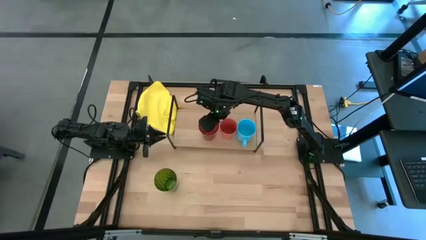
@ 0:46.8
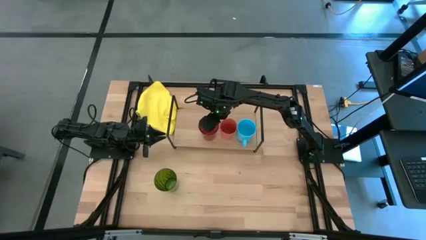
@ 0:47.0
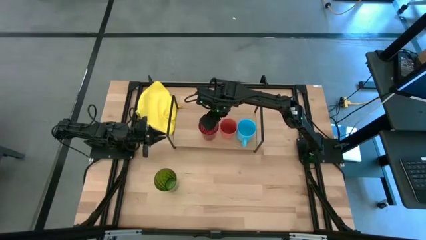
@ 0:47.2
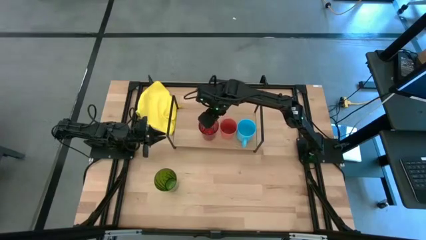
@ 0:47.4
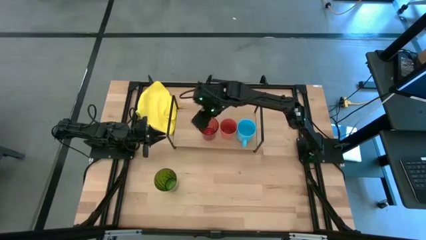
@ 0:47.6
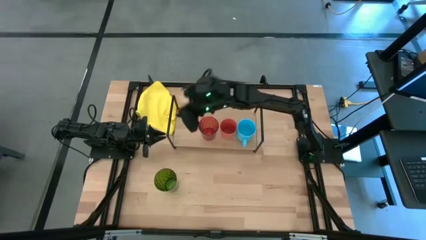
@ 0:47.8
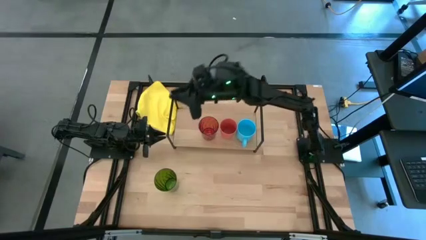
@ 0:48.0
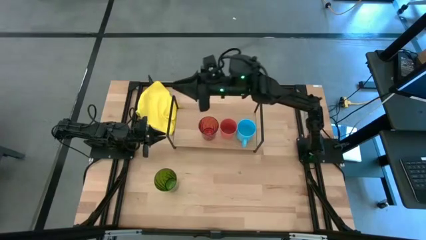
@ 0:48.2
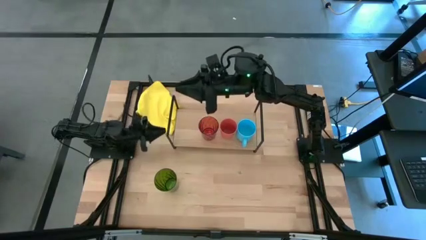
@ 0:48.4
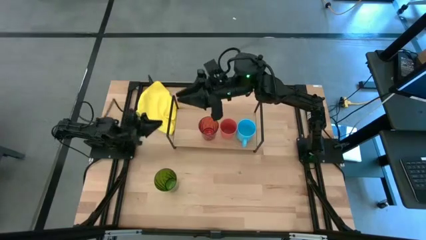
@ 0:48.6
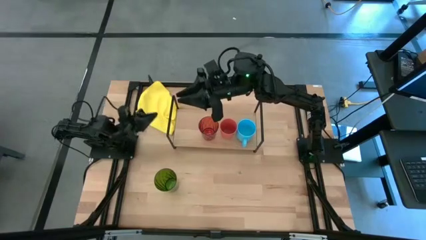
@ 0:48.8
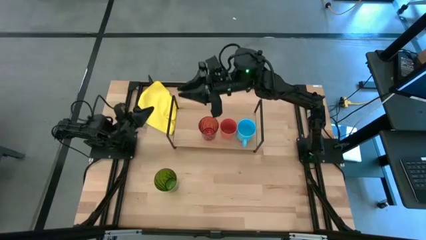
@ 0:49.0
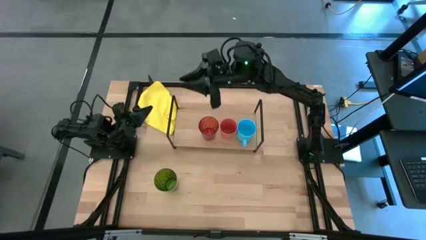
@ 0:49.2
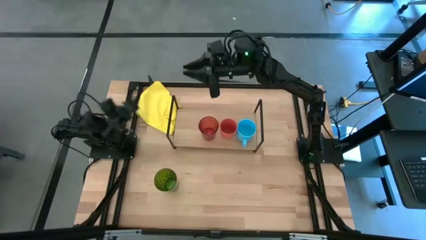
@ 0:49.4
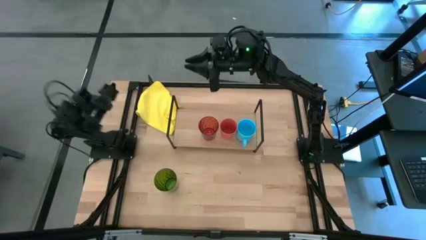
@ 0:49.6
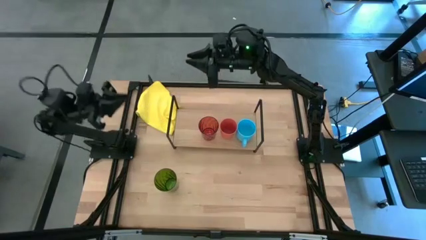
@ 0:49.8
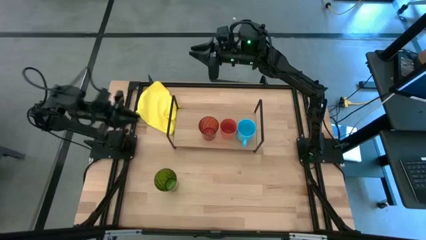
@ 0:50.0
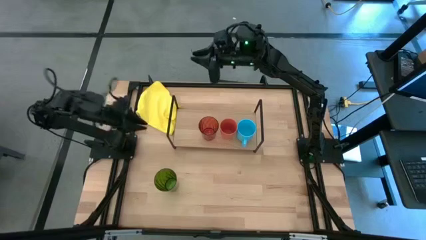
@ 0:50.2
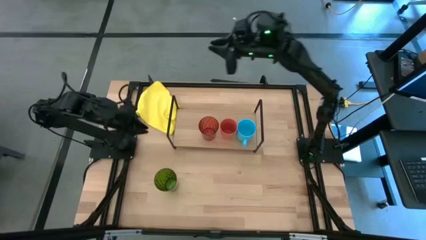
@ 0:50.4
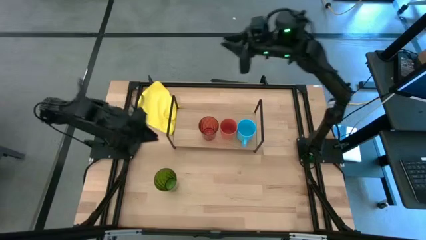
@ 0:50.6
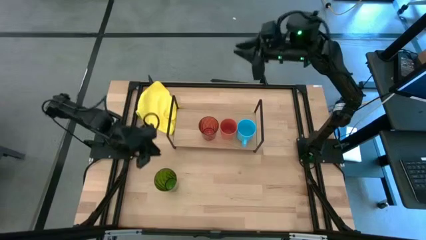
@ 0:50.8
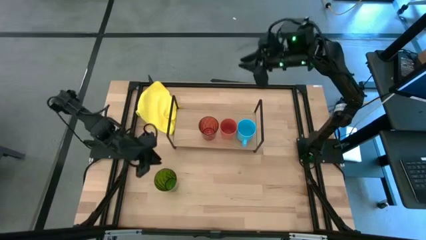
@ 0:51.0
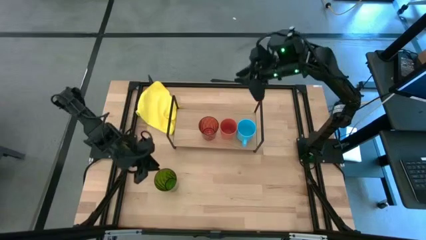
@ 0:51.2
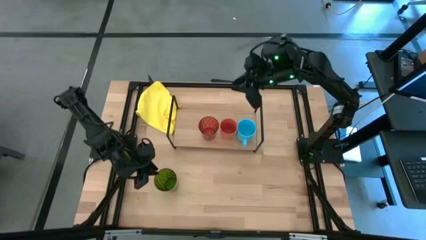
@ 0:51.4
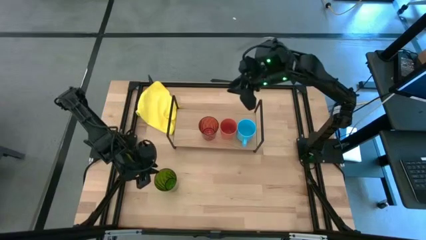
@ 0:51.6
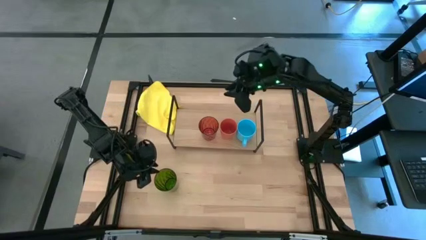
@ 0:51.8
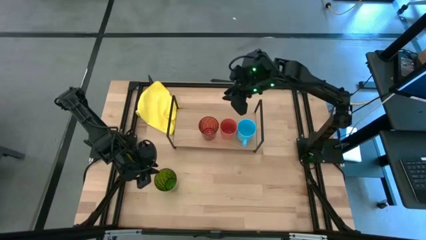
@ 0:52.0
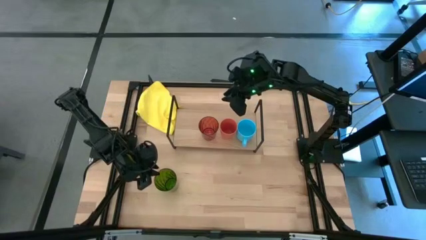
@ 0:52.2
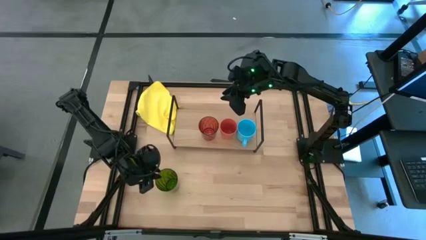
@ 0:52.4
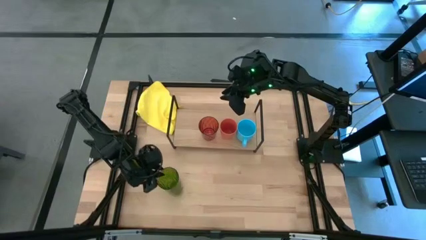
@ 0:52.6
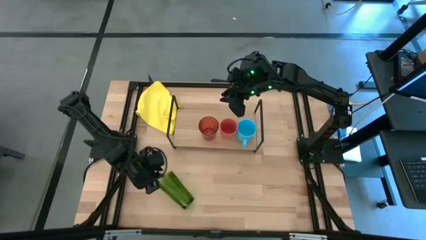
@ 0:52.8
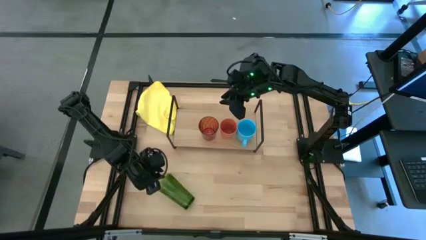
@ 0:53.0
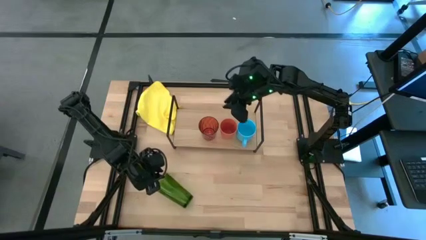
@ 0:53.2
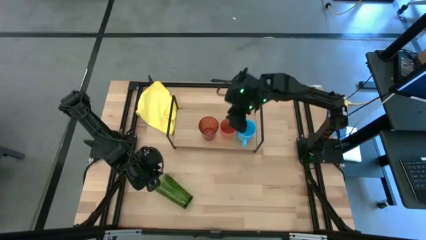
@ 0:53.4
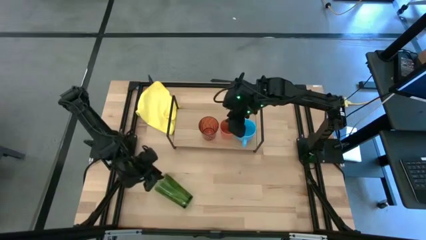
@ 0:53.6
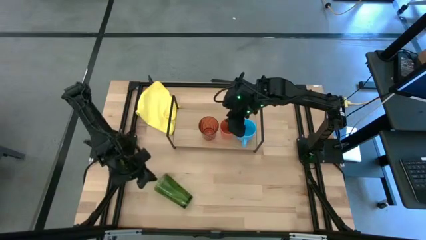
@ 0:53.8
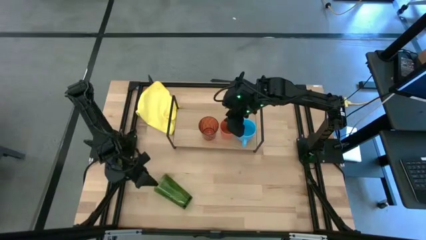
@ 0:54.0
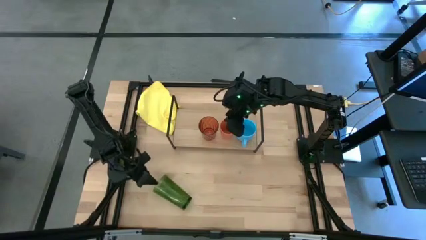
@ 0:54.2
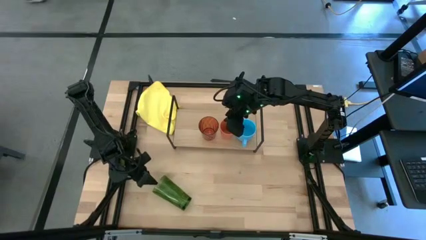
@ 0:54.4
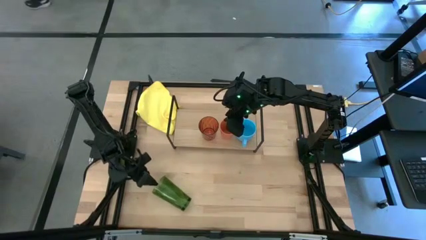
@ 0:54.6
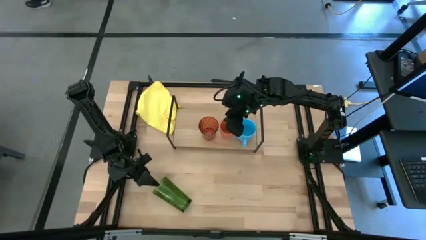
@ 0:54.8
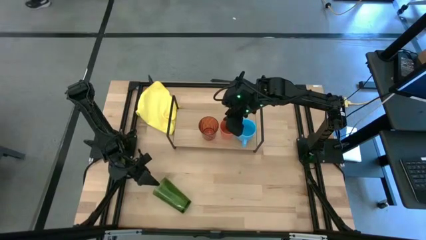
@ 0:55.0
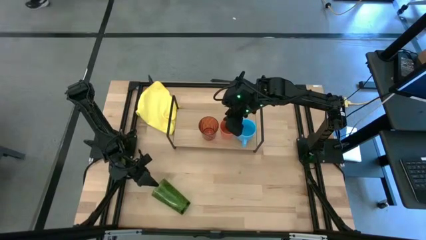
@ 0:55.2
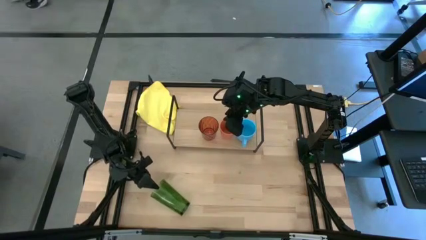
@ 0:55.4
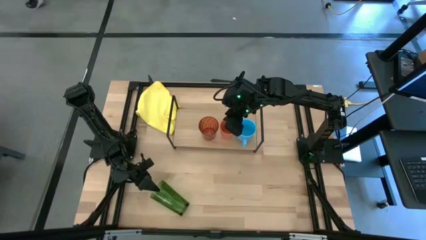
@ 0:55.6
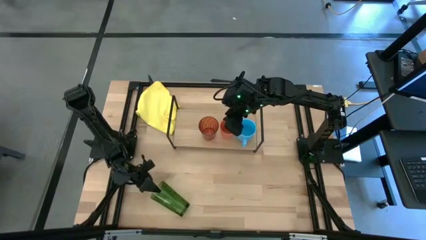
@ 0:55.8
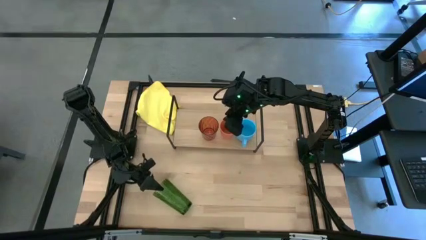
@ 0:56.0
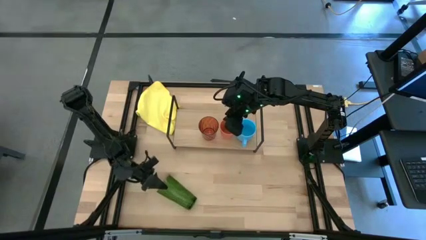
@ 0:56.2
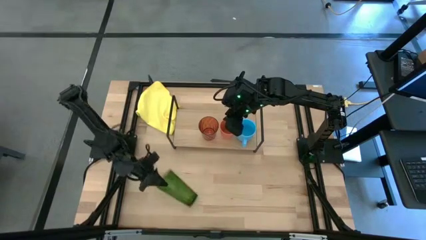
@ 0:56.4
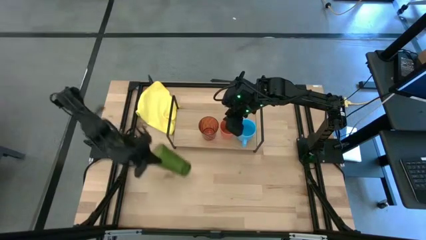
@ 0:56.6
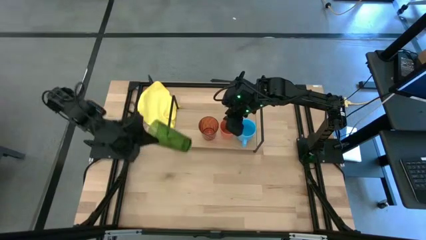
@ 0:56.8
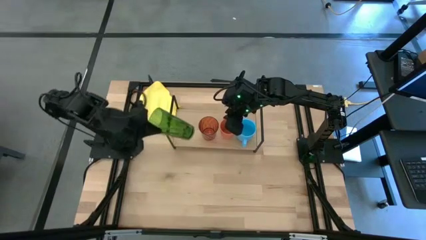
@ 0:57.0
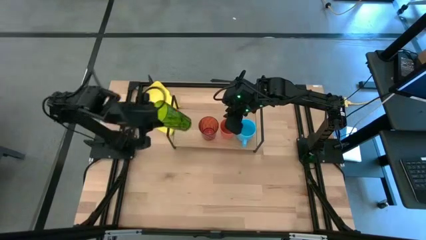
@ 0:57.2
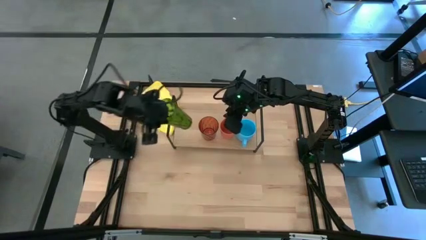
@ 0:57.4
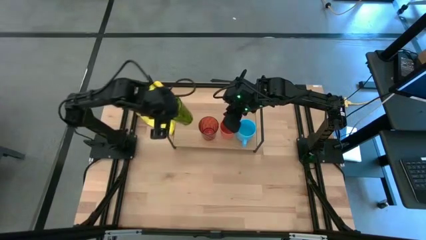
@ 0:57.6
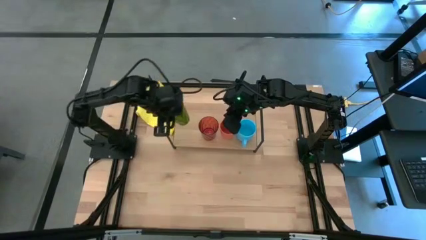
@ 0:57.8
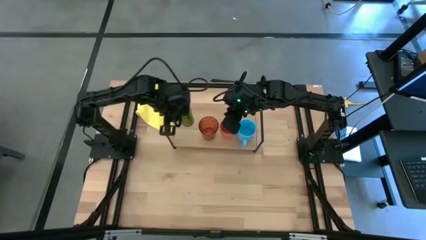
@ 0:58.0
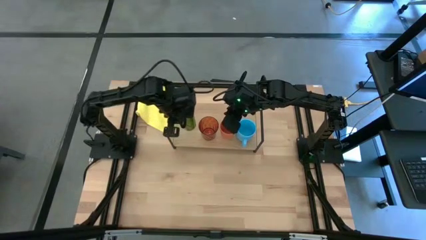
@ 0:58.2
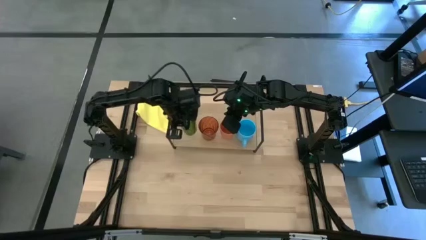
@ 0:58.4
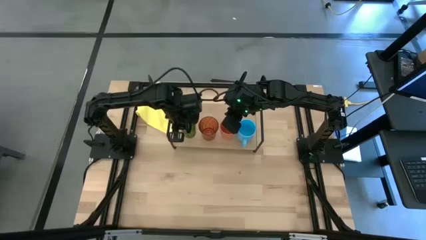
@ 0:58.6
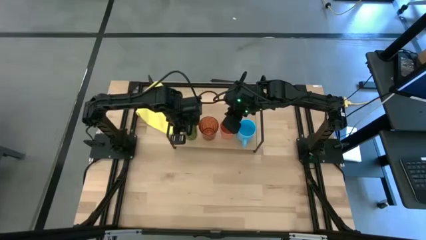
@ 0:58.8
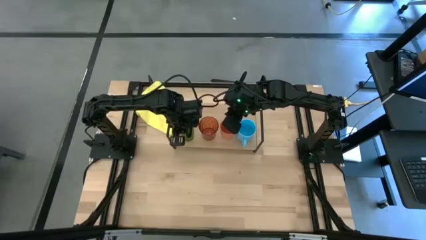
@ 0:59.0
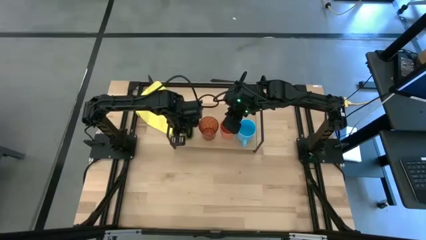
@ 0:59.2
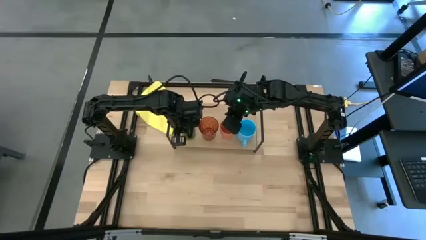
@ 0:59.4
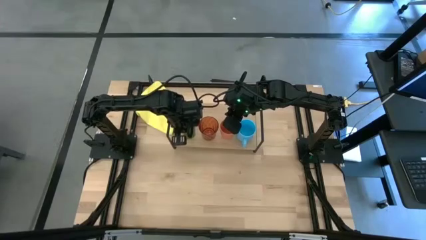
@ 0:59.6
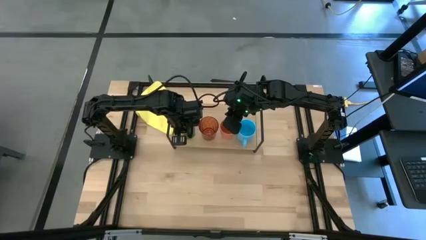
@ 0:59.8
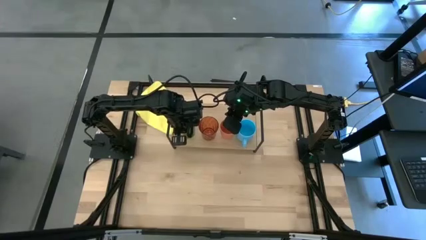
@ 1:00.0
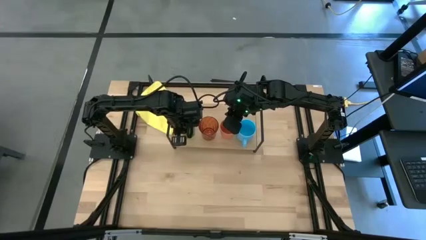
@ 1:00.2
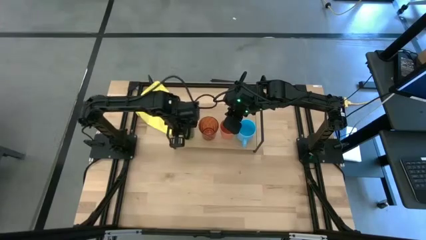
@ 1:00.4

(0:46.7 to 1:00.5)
Task: Stack small to large cups/mugs on shelf
Put the green cup on the shelf

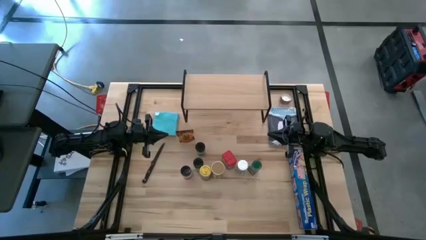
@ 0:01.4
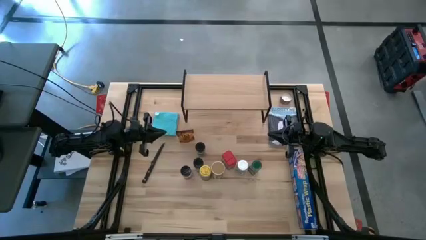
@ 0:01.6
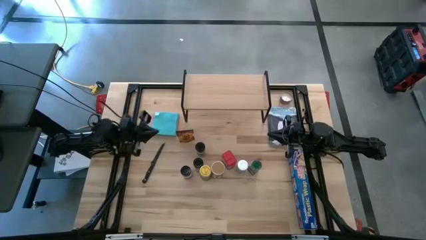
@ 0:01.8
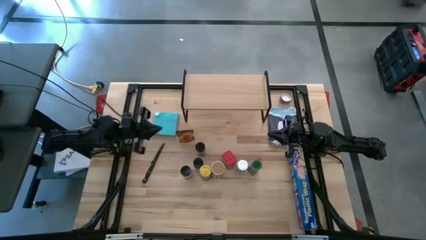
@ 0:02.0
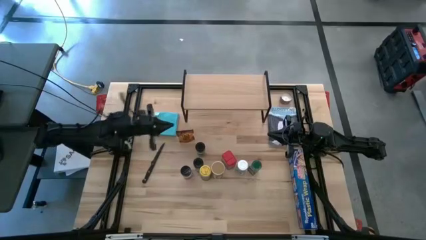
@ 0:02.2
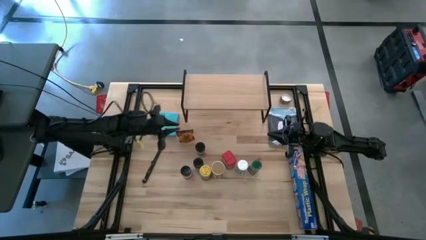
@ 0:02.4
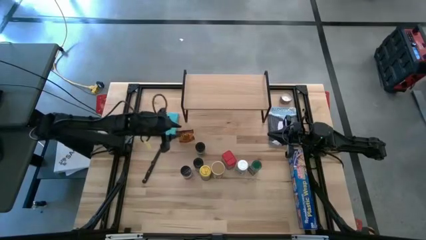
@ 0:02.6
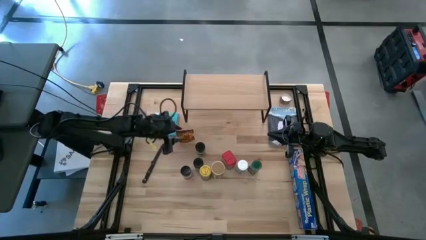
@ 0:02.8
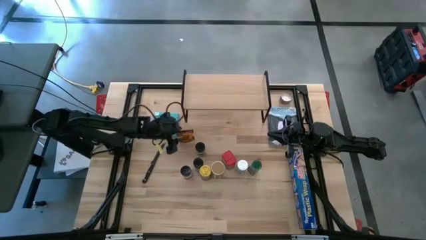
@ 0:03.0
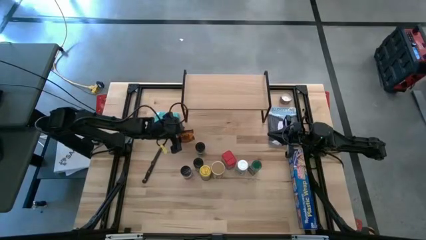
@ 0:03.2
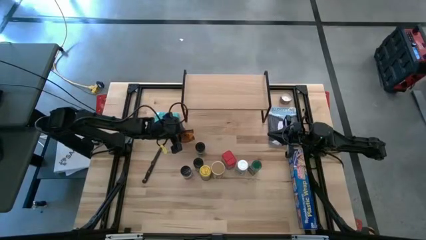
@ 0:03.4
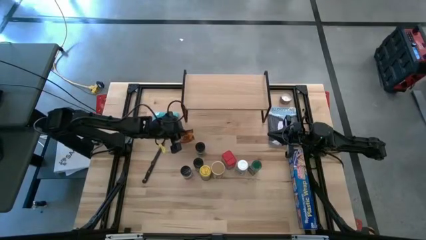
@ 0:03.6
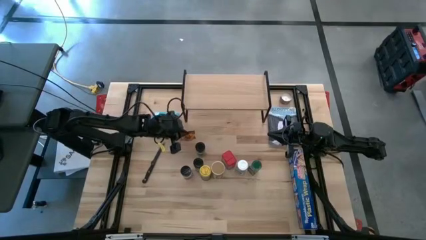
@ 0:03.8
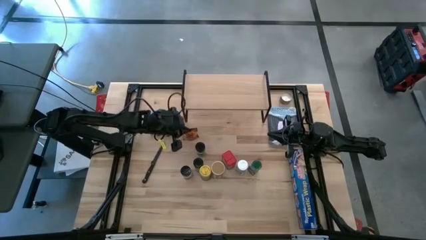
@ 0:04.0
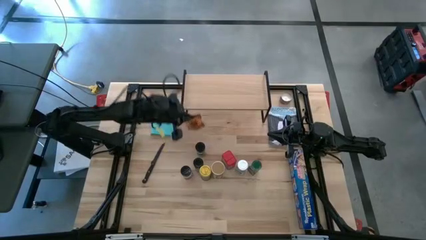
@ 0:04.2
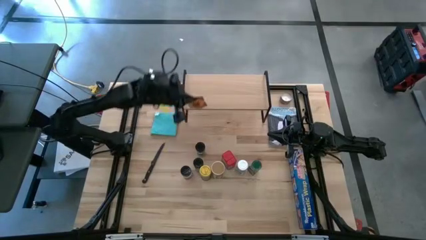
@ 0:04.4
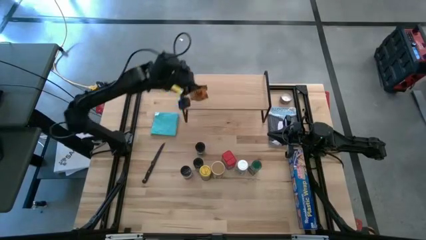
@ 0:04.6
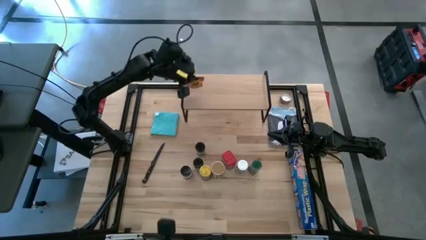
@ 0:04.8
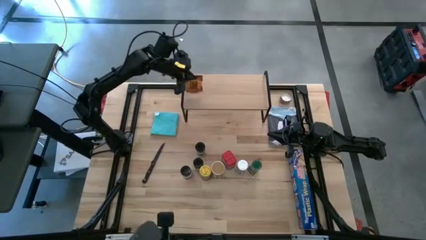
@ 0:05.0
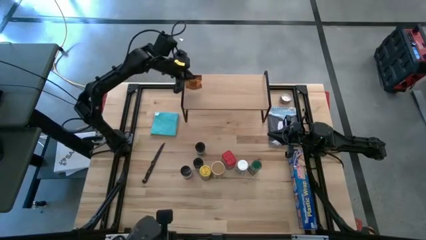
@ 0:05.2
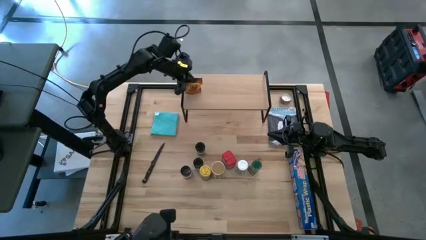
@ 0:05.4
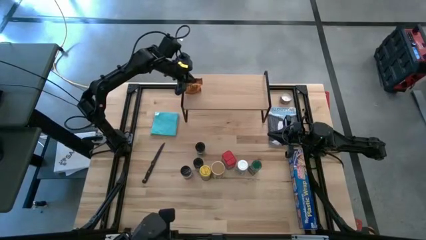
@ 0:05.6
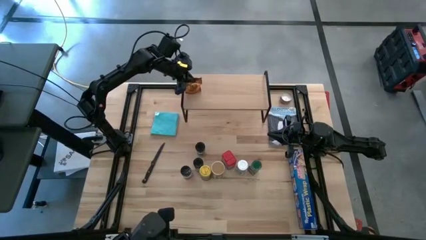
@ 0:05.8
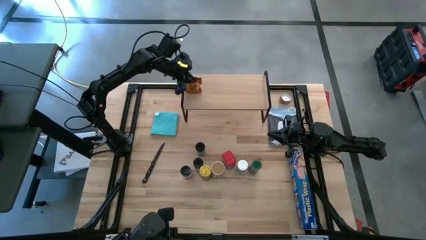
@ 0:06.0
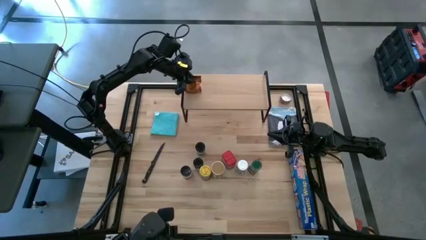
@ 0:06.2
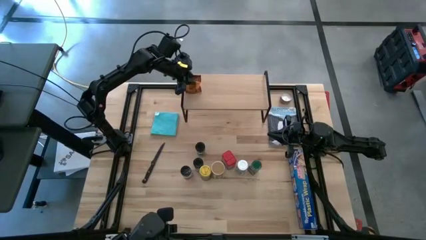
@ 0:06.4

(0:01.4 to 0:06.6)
Task: Shelf spices
Put the orange seasoning bag on the shelf
